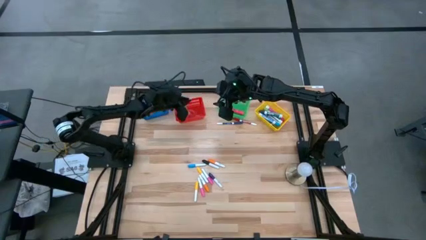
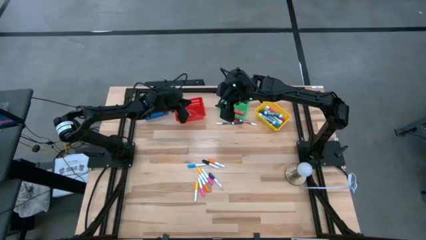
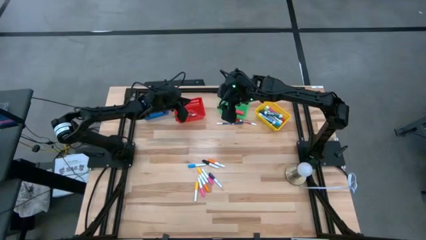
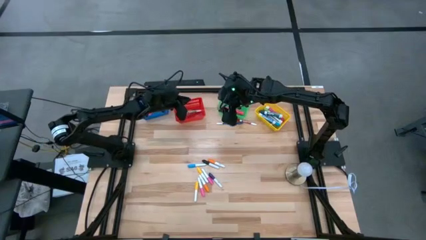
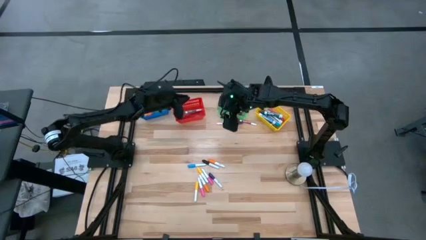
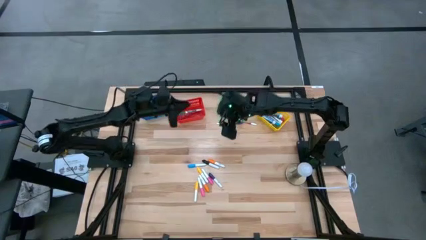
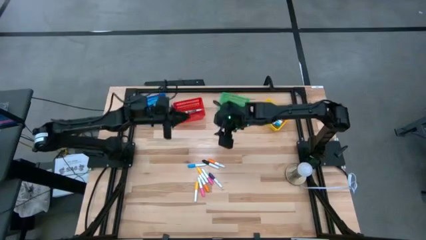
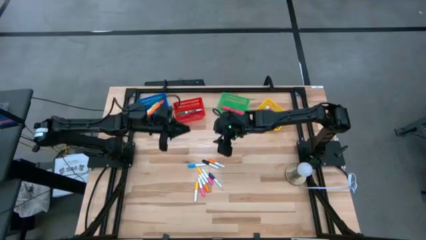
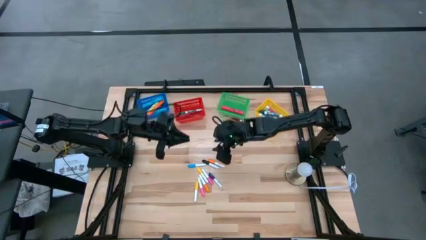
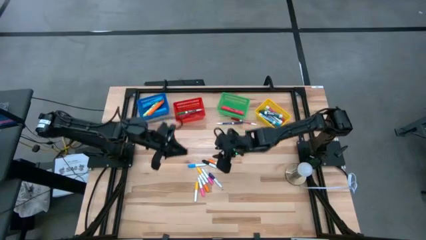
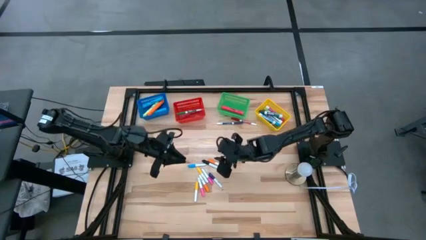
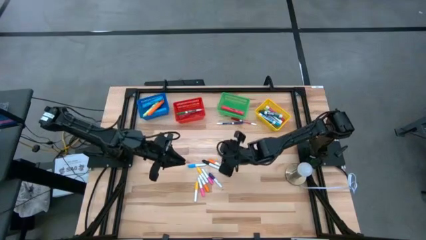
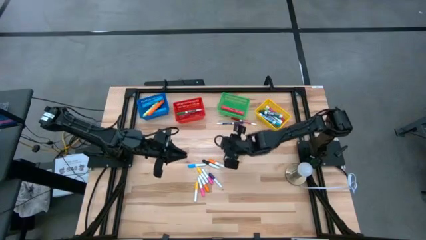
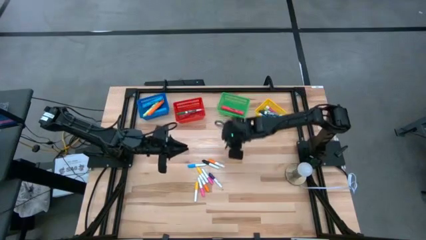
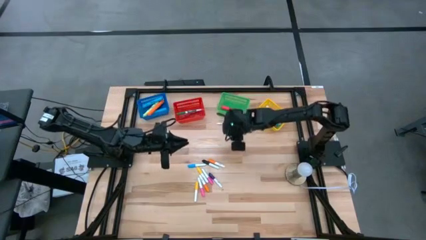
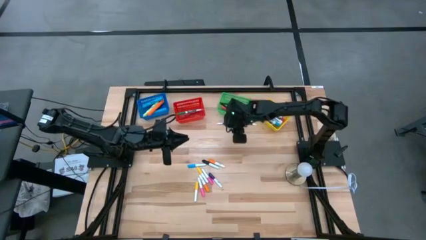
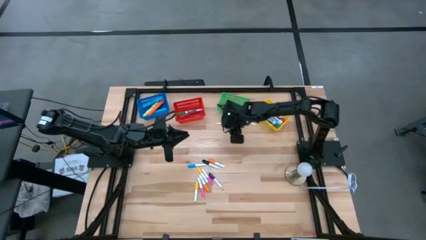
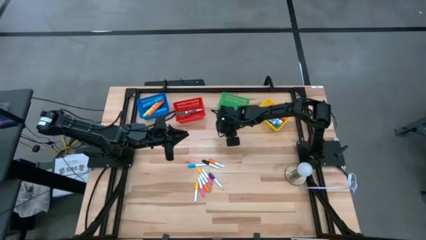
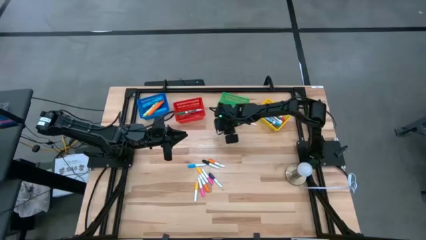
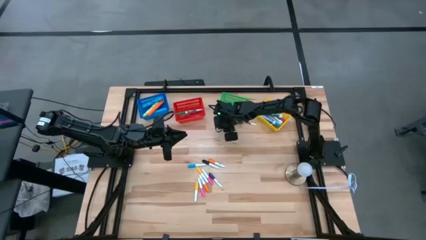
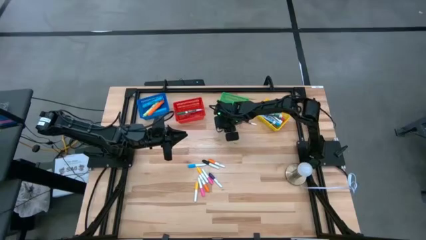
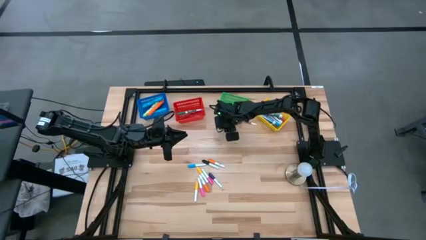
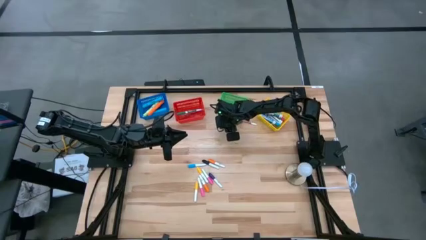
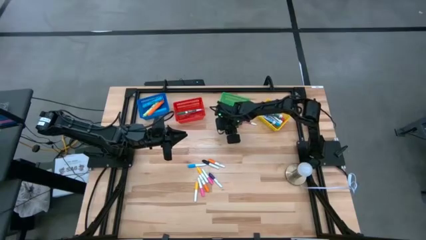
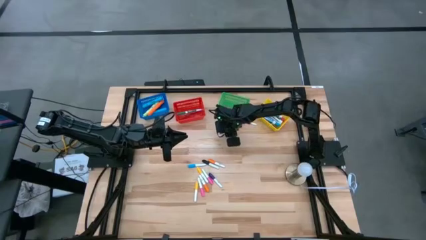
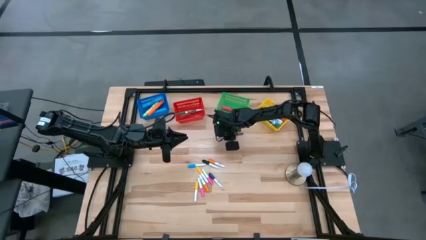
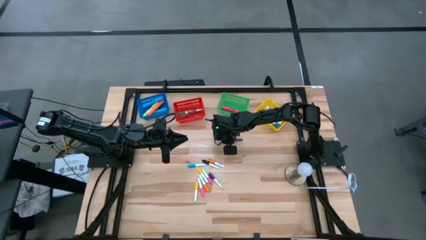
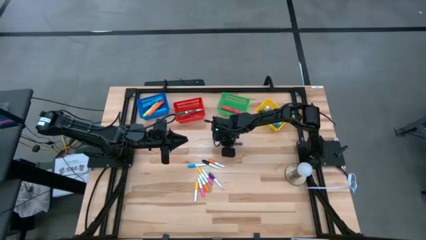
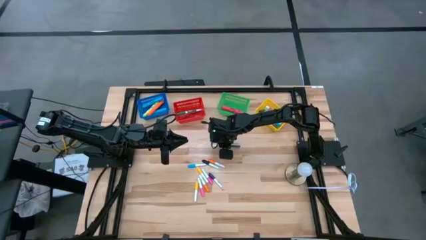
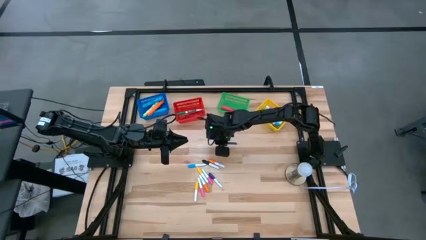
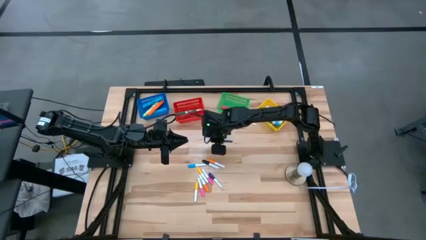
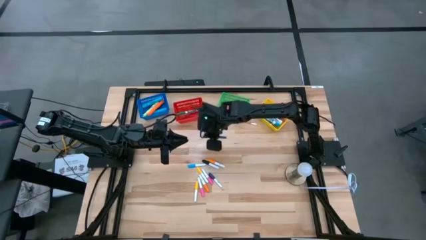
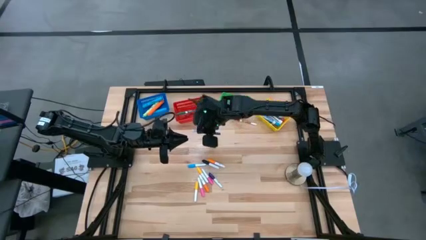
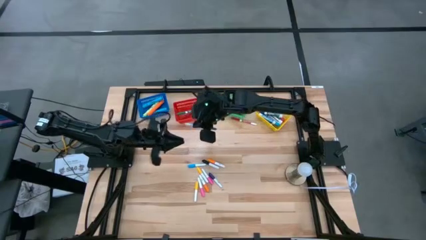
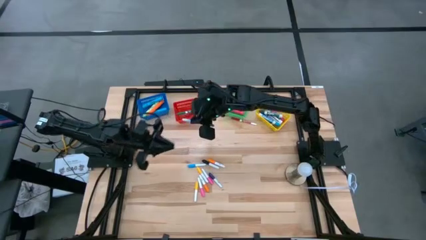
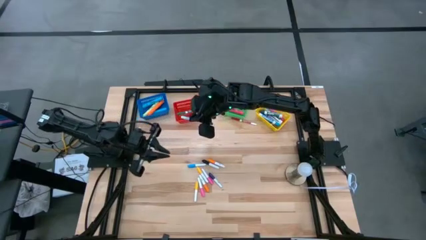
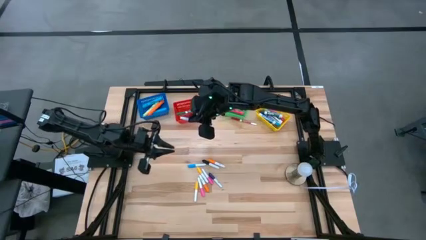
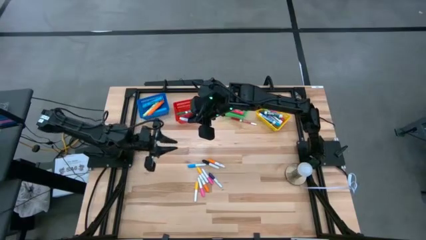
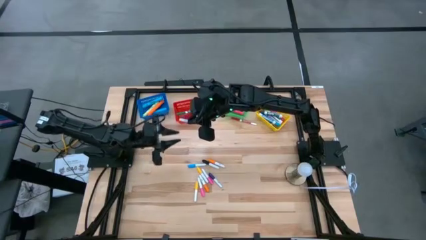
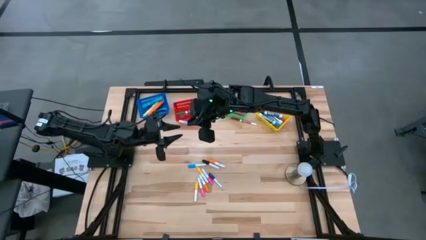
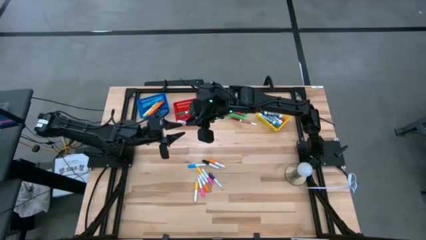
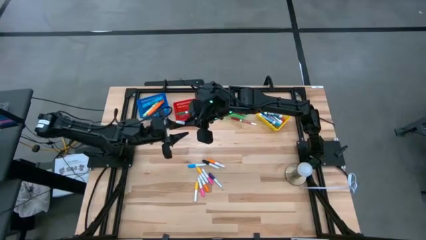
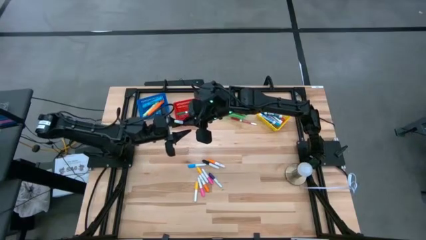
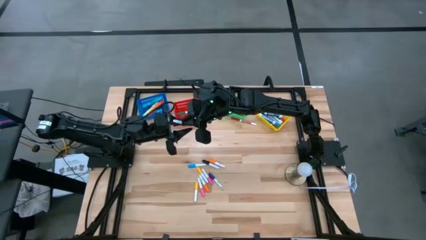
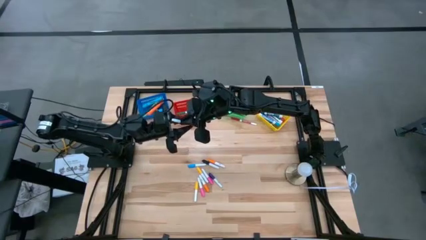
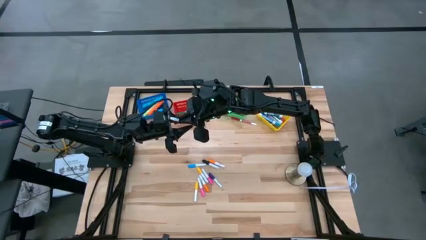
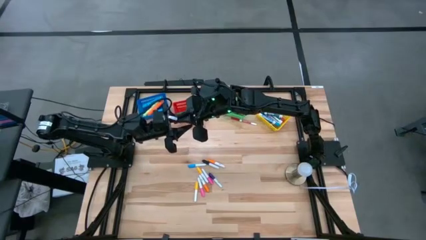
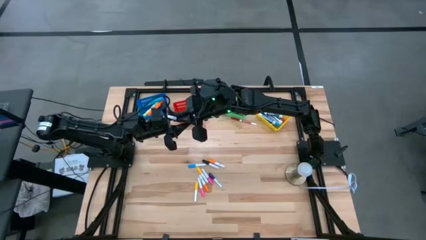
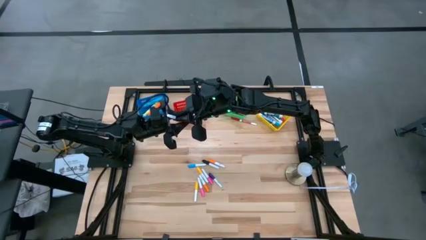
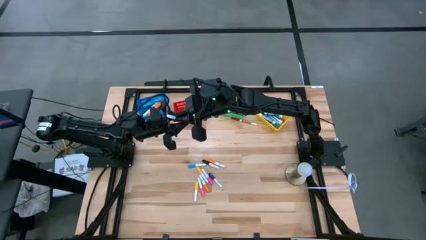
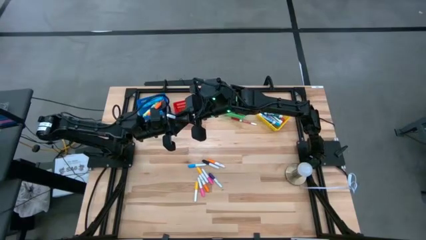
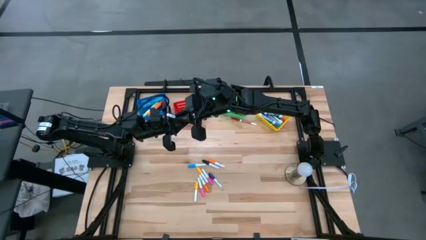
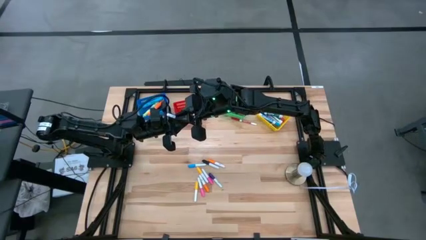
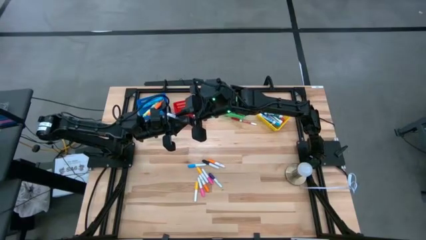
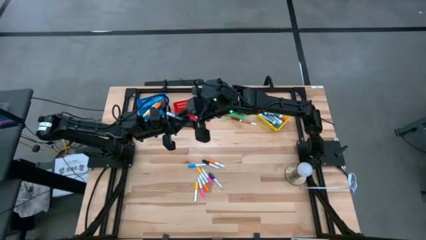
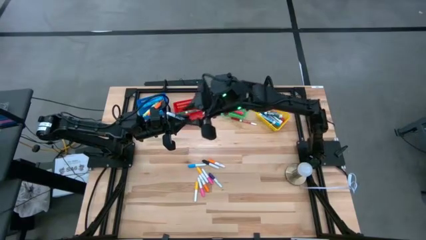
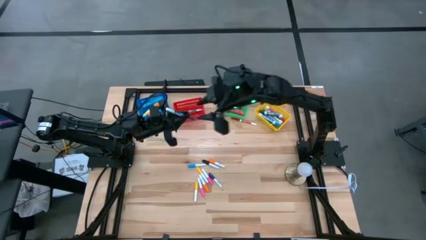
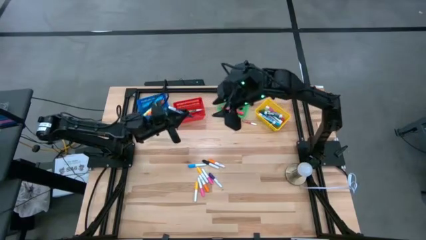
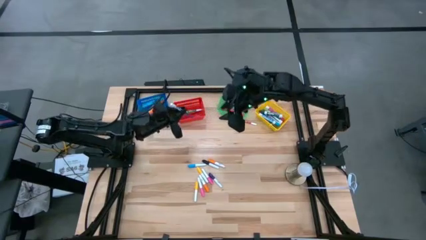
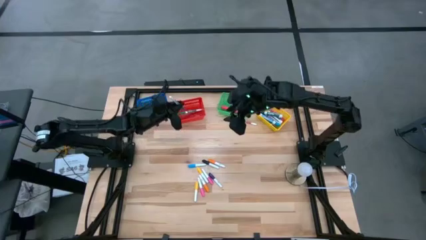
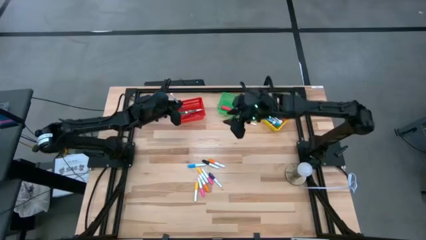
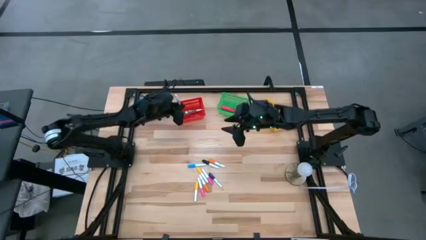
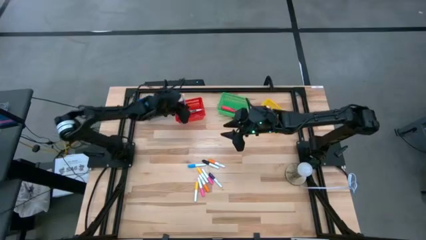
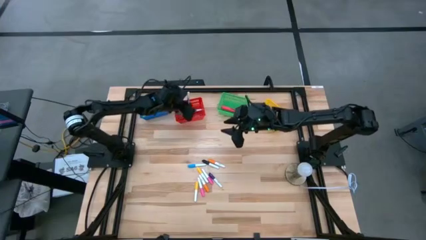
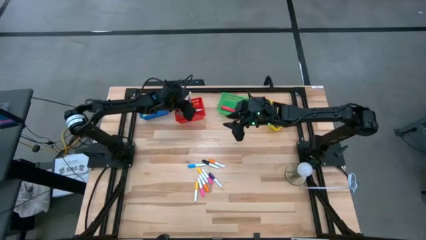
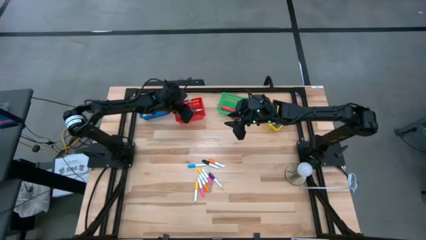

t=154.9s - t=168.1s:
Task: Pick & Place Markers
Put the small purple marker pen into the red bin

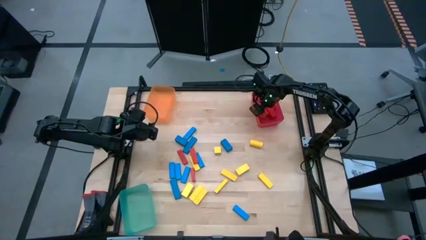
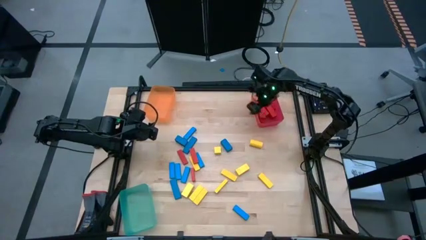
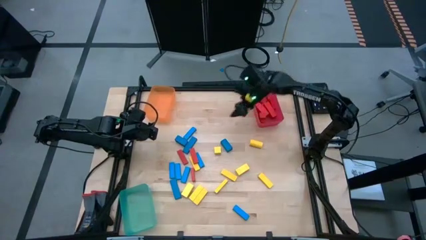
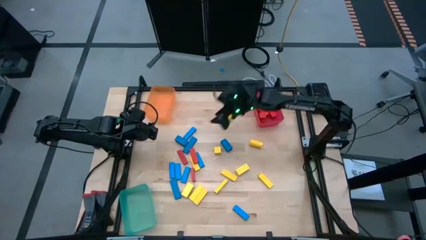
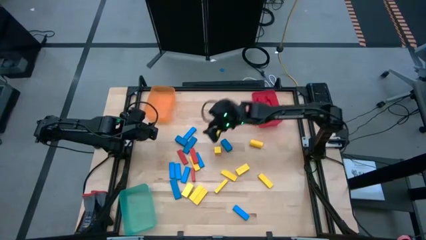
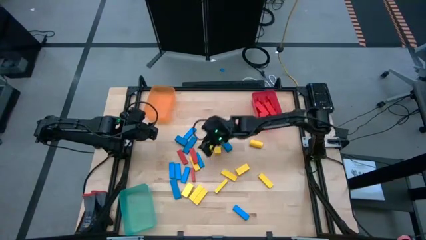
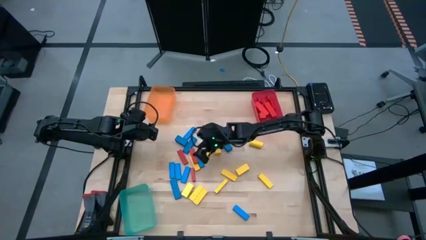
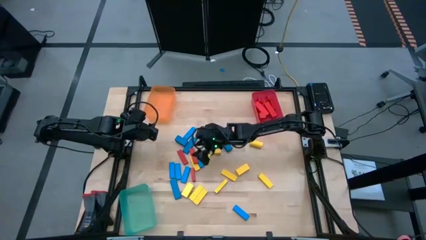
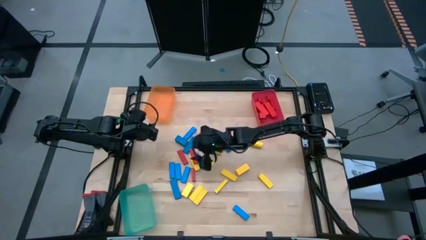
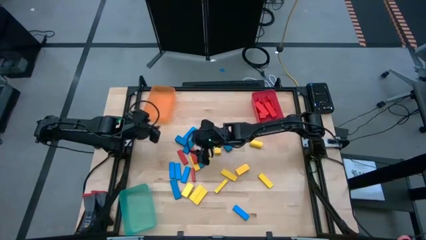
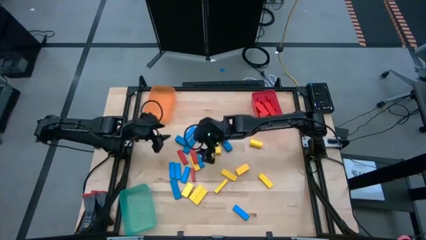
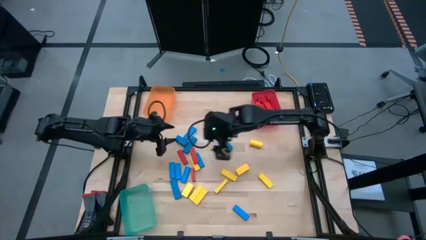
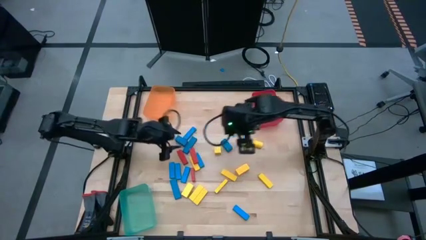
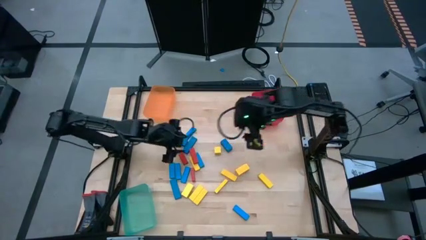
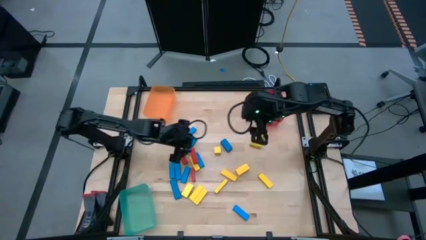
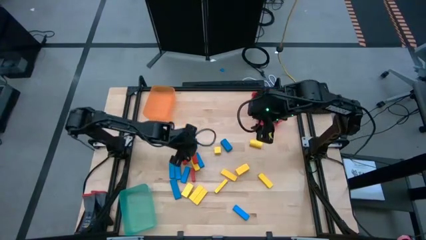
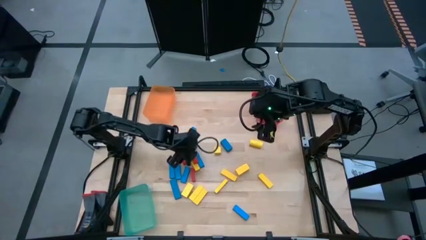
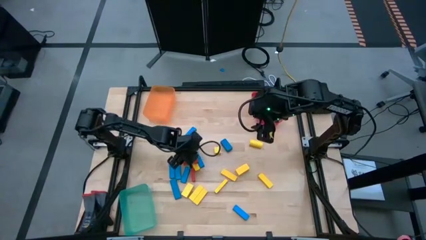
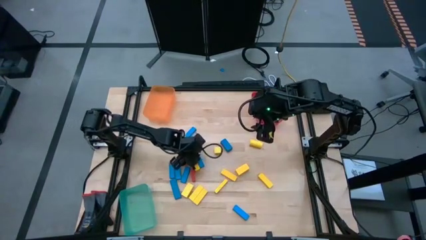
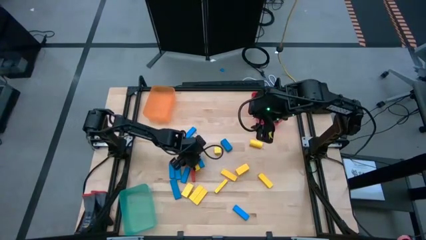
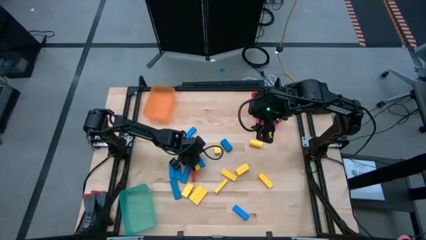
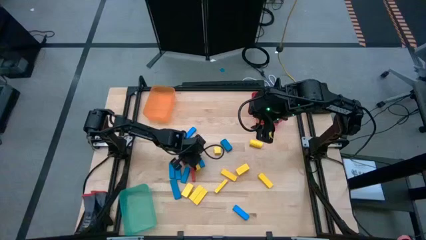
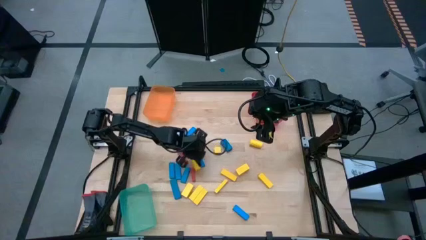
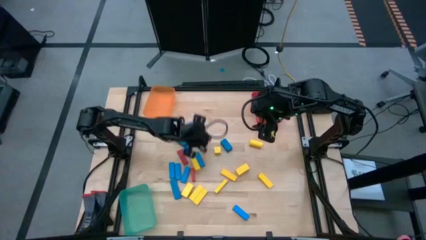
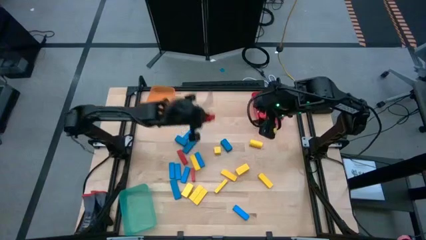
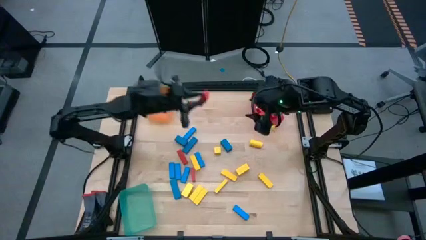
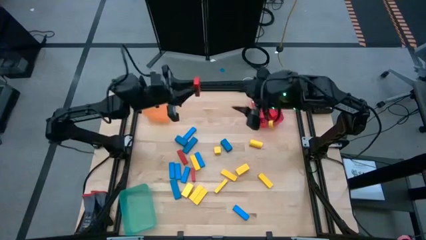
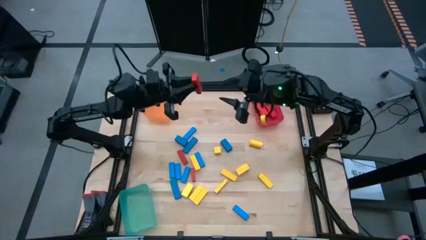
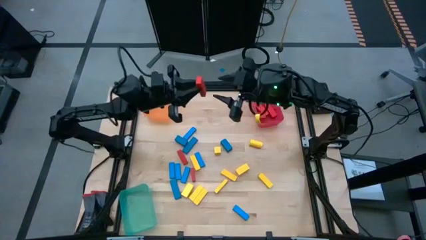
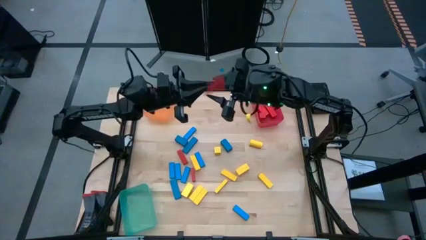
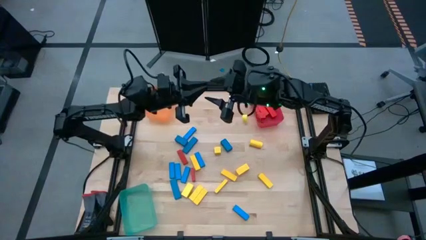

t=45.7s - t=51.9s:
Task: Sort blocks
Put the right red block into the red transparent bin
